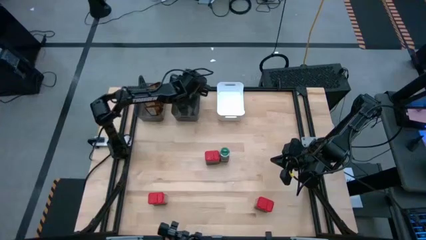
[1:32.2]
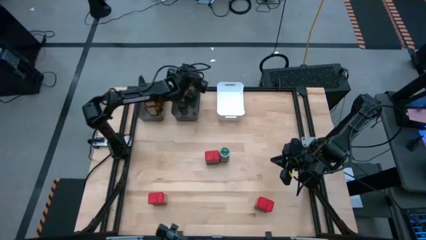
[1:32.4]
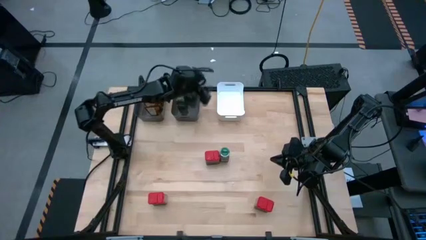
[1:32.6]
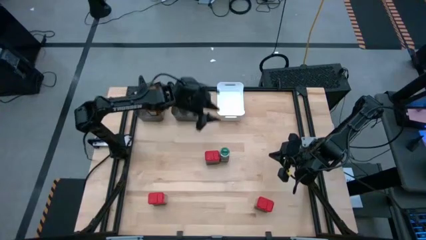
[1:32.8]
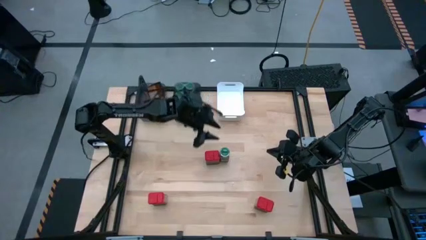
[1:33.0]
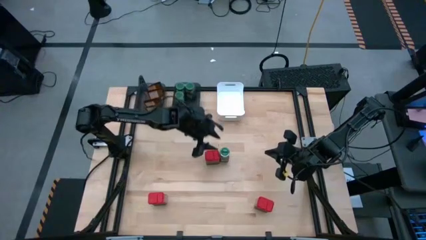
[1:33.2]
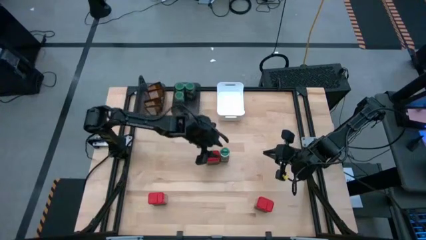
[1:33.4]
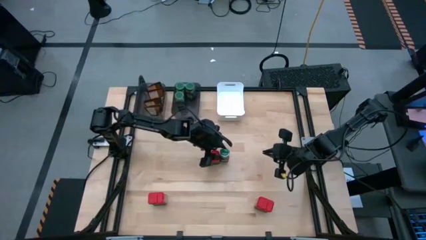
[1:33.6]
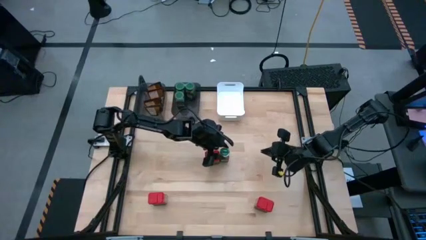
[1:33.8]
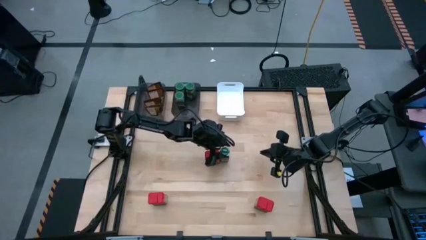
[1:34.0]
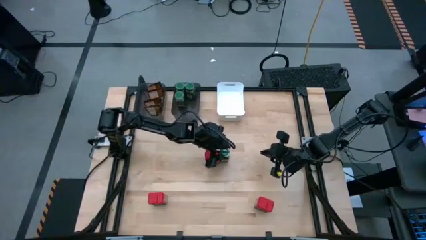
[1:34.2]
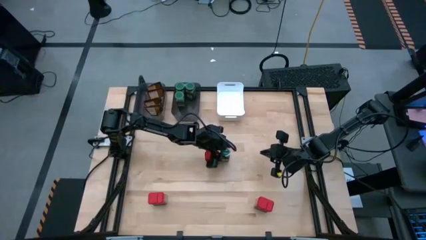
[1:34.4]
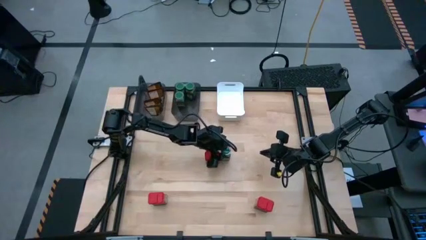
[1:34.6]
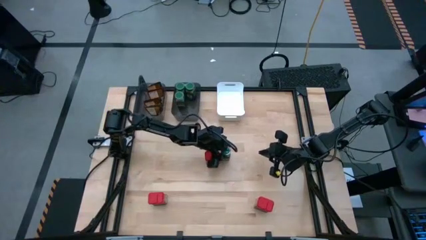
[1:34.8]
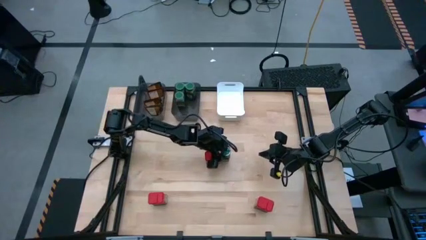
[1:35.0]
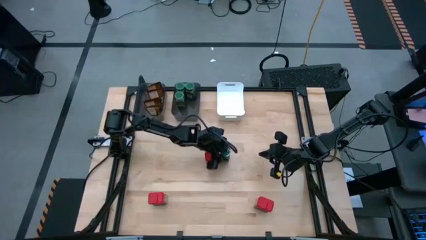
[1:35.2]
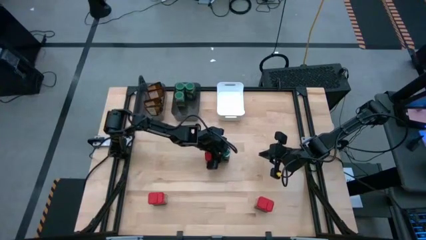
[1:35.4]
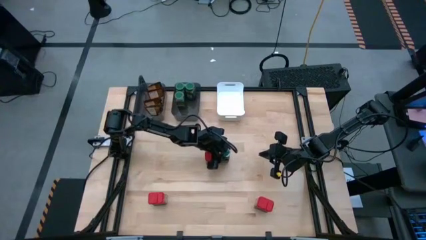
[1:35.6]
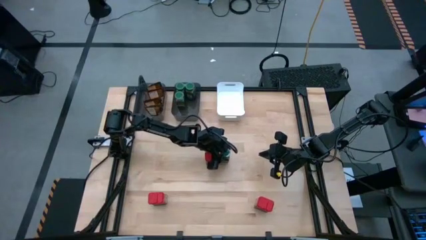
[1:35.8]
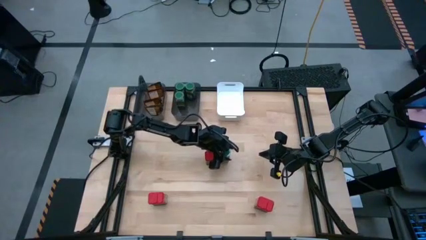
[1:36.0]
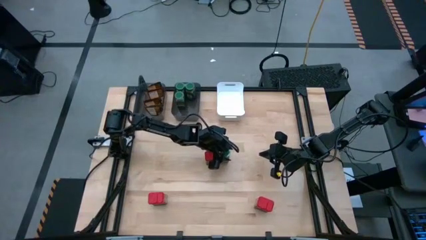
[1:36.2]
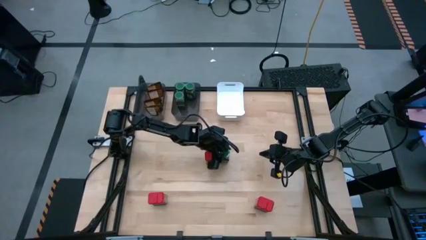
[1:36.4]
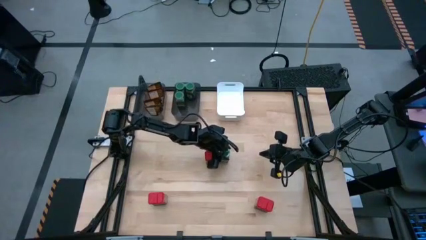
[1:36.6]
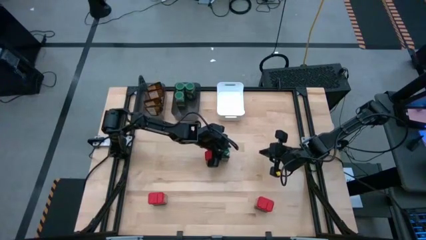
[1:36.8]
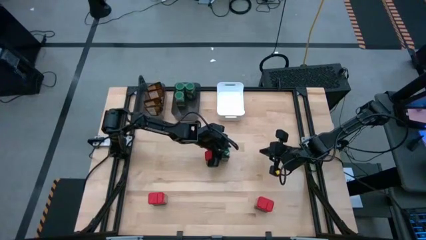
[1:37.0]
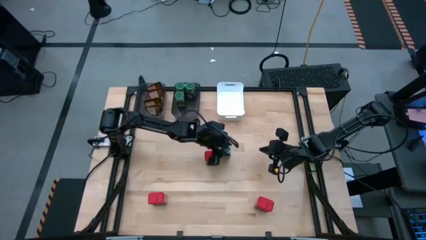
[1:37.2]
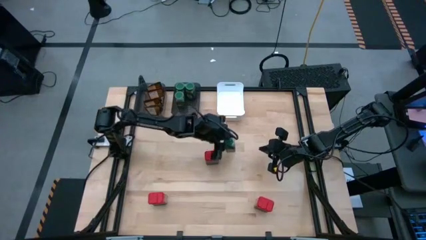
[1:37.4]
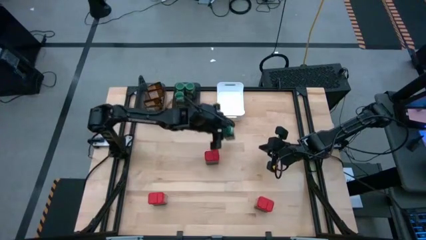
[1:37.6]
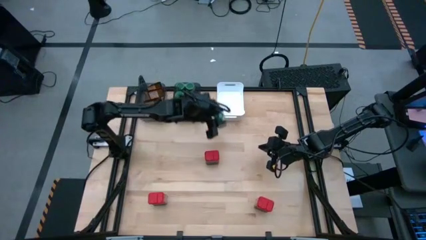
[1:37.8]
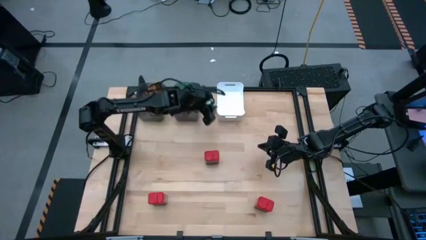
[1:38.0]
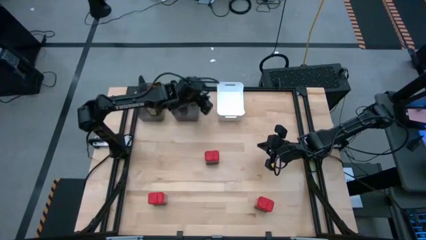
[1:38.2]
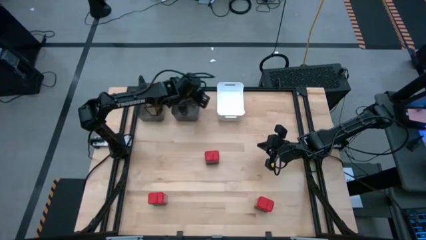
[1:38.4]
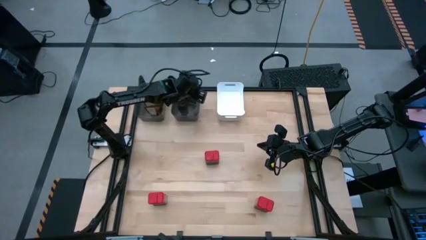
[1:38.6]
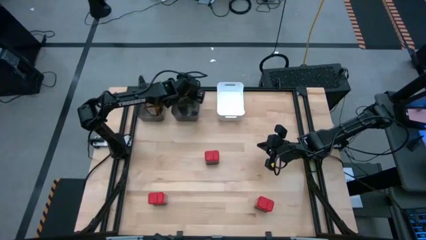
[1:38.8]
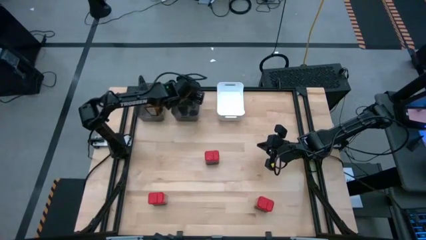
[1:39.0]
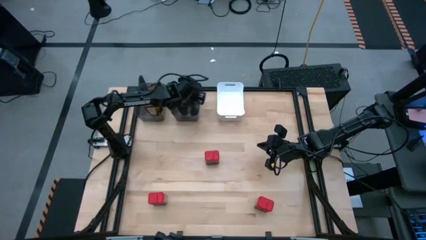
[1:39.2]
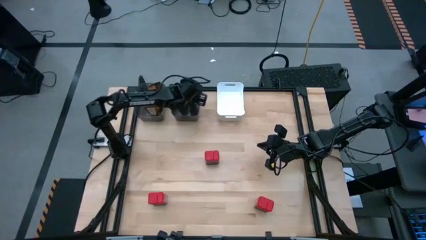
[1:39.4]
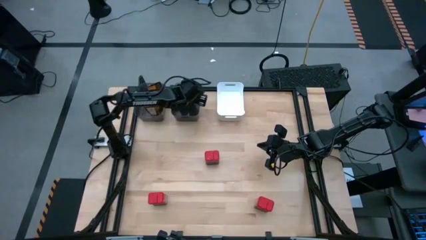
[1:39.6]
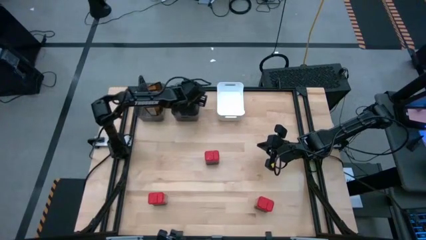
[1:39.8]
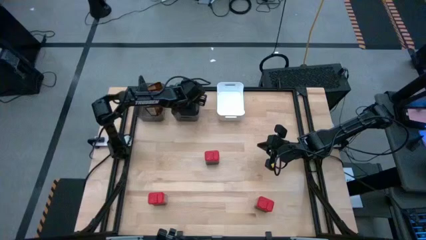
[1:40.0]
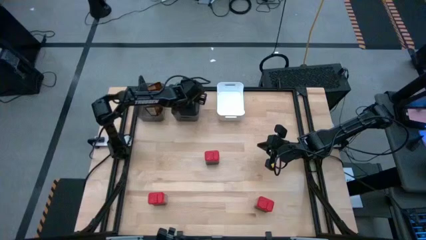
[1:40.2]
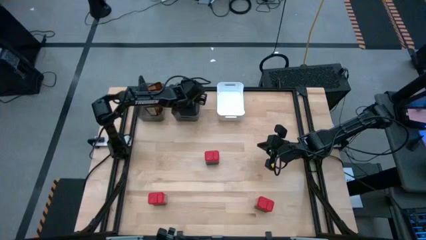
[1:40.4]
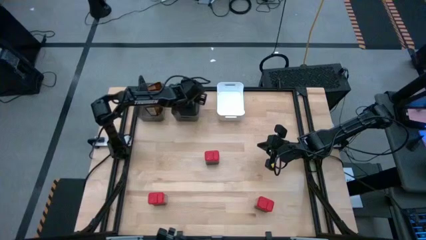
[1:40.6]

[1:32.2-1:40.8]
Task: Sort spices by type
Put the green seasoning bottle into the right black bin

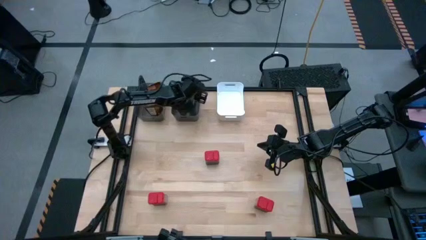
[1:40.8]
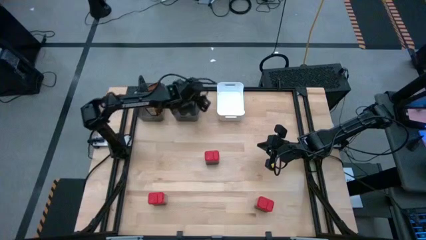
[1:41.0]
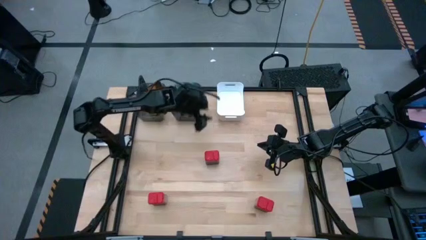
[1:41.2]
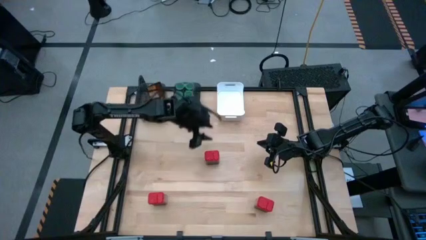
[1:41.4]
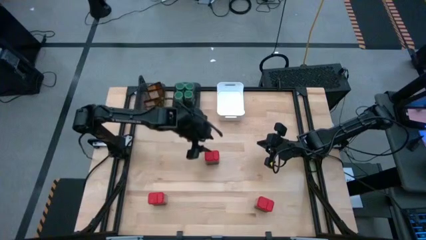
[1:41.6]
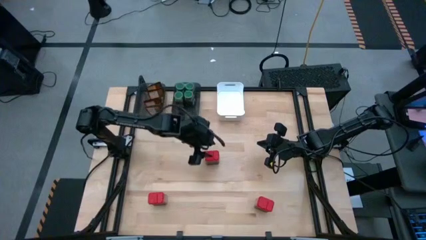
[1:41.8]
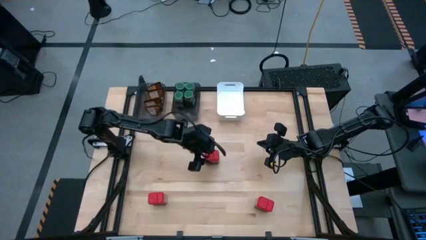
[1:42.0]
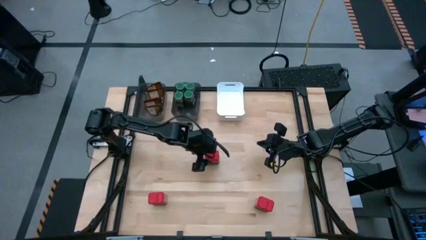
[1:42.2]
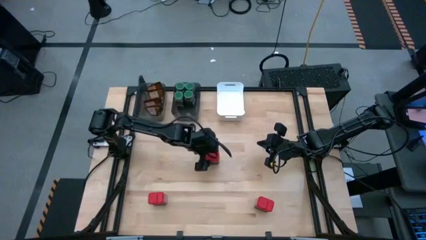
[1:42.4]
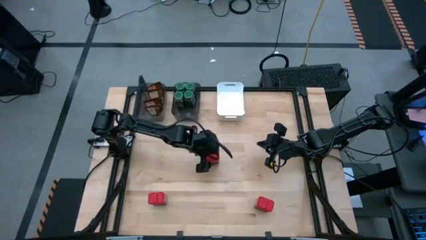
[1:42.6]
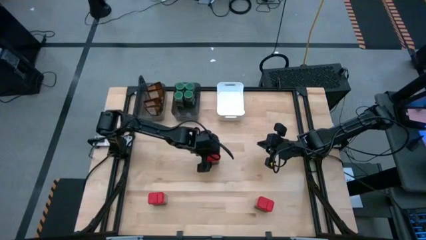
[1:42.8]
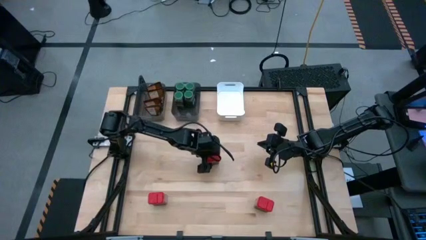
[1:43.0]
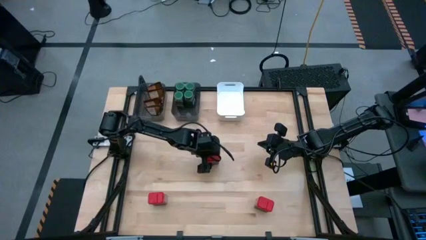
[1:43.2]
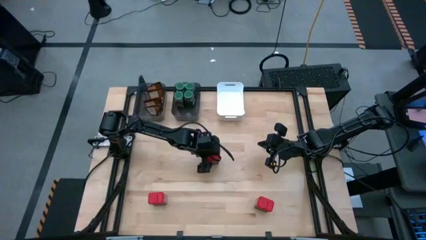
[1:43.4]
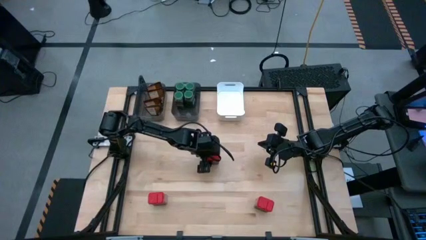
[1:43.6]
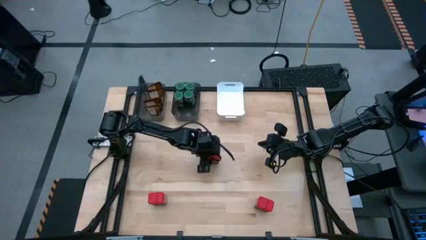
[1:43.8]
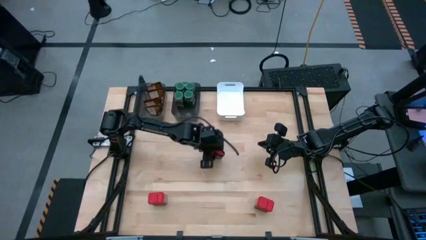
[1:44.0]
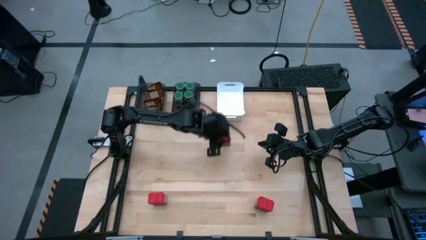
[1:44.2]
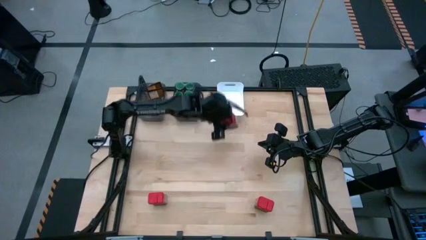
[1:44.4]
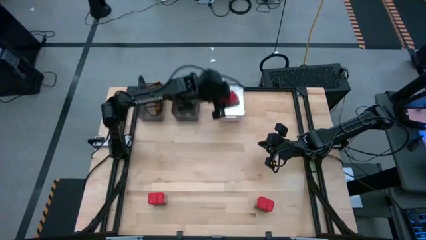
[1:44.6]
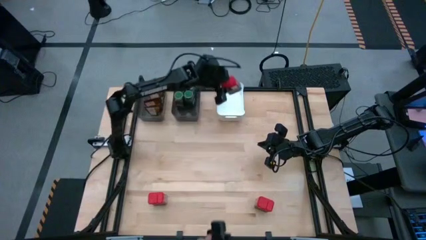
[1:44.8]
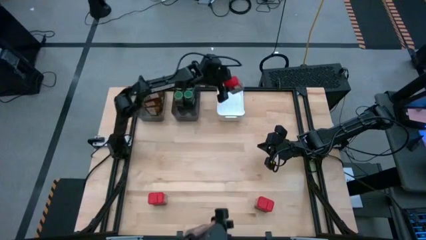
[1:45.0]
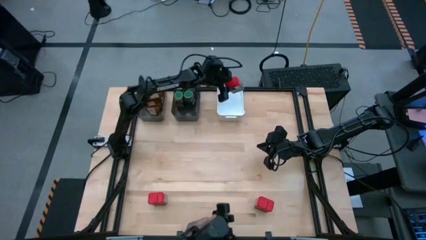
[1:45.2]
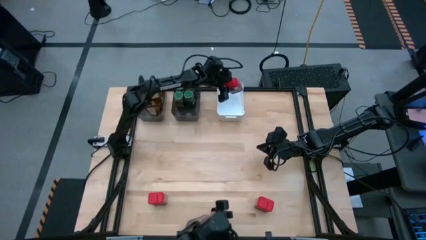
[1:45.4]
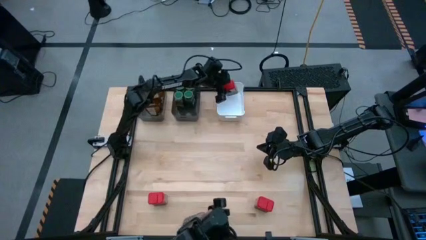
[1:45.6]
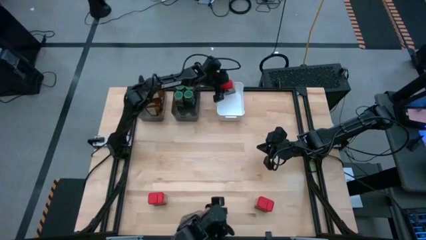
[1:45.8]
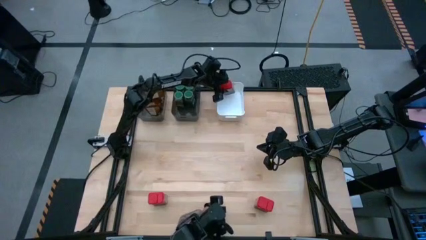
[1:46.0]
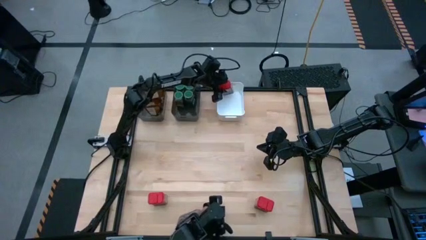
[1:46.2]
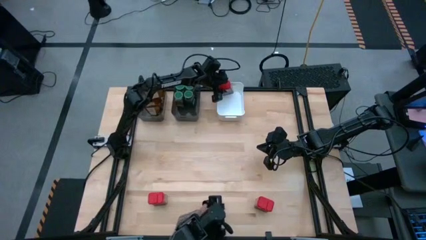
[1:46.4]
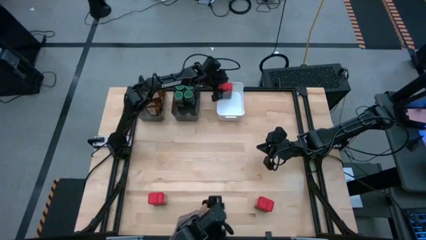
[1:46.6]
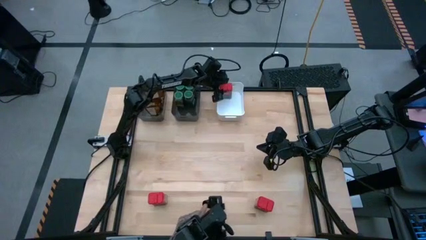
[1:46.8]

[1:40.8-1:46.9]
Put the top red seasoning can into the white bin
